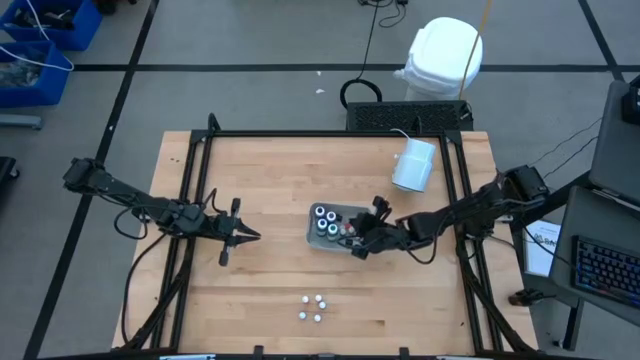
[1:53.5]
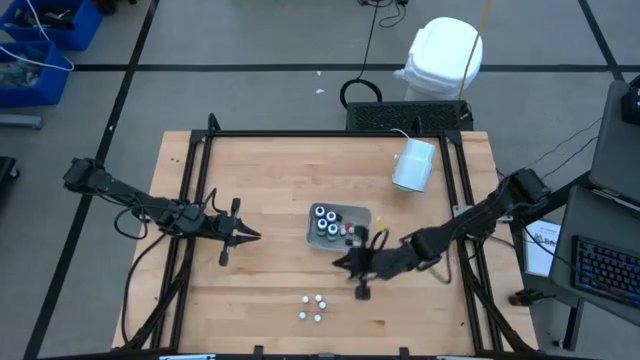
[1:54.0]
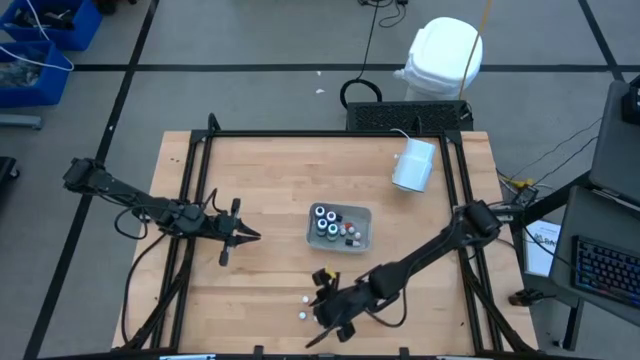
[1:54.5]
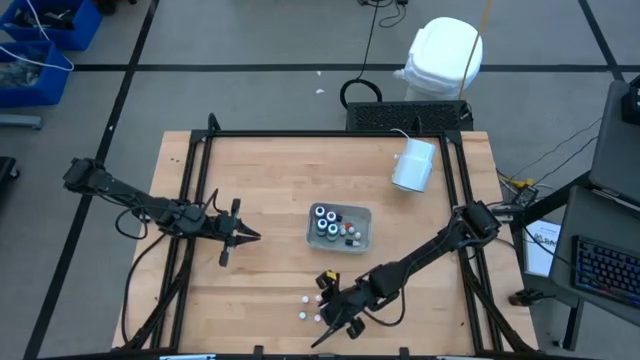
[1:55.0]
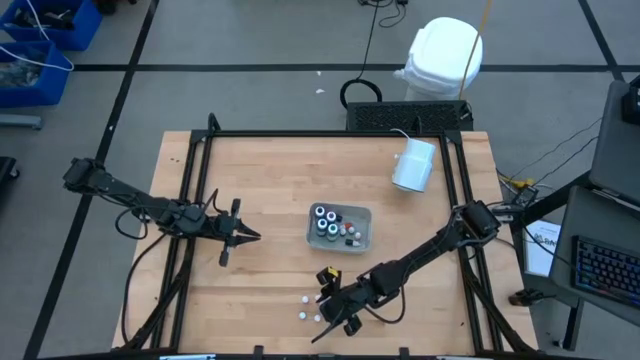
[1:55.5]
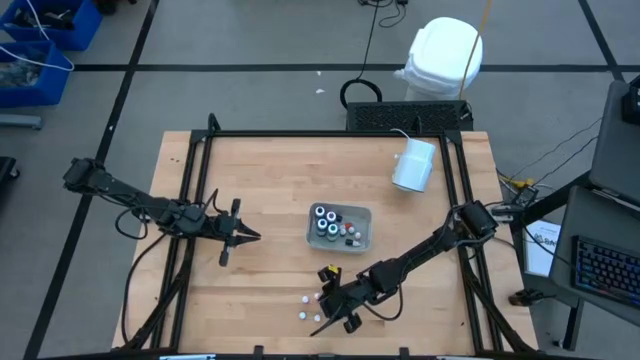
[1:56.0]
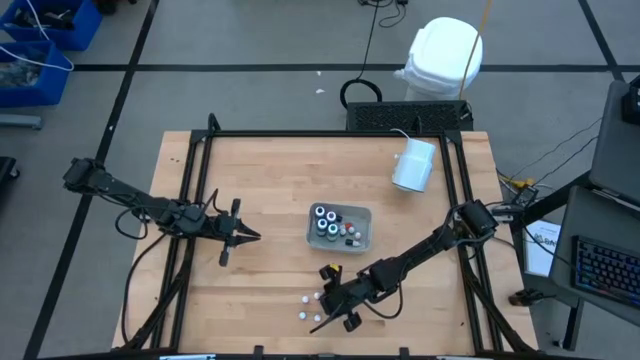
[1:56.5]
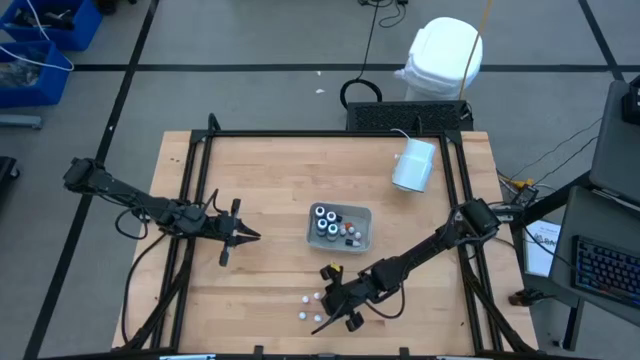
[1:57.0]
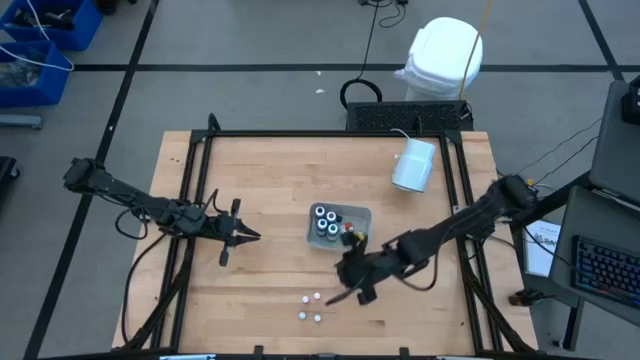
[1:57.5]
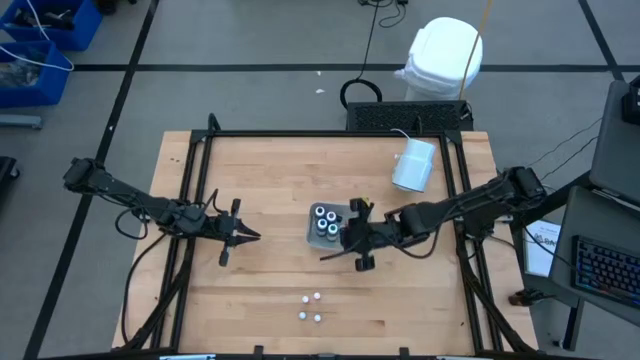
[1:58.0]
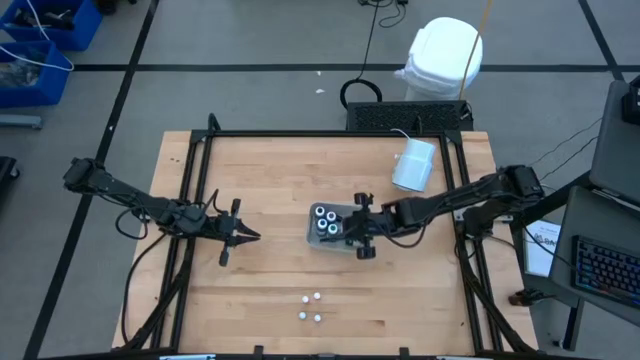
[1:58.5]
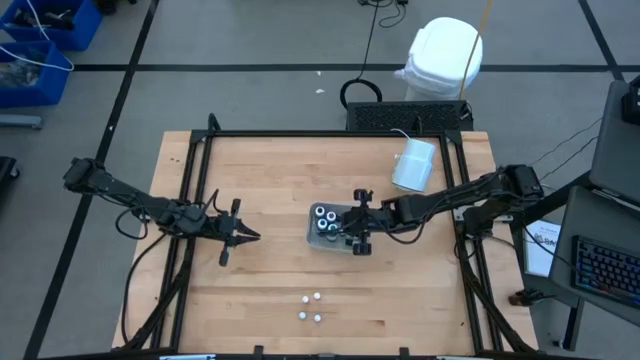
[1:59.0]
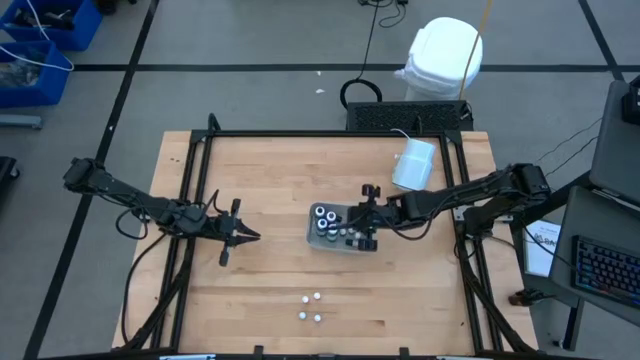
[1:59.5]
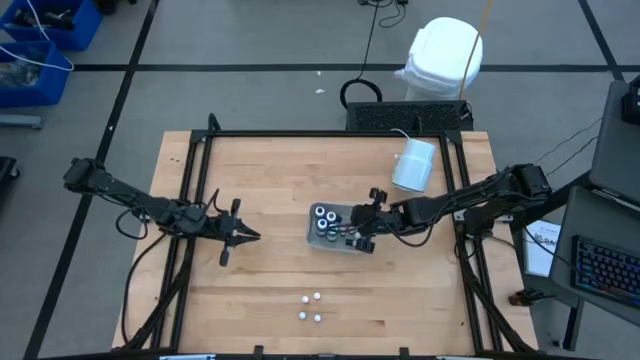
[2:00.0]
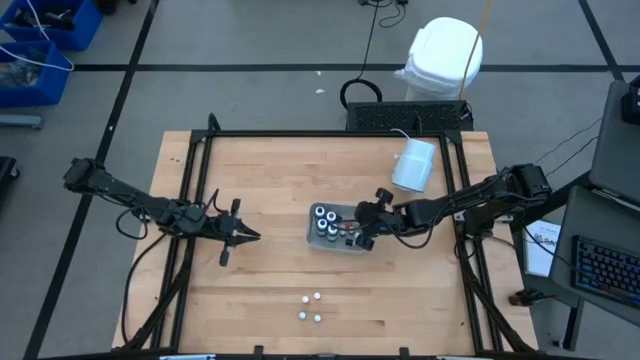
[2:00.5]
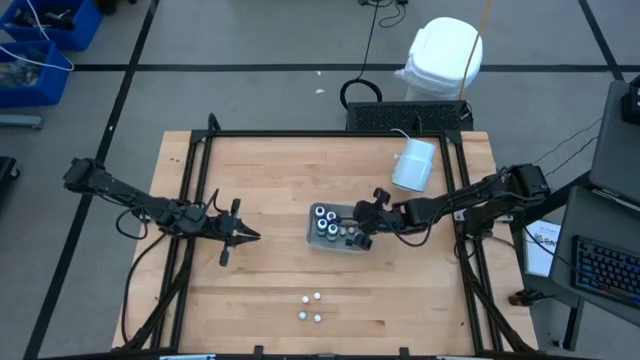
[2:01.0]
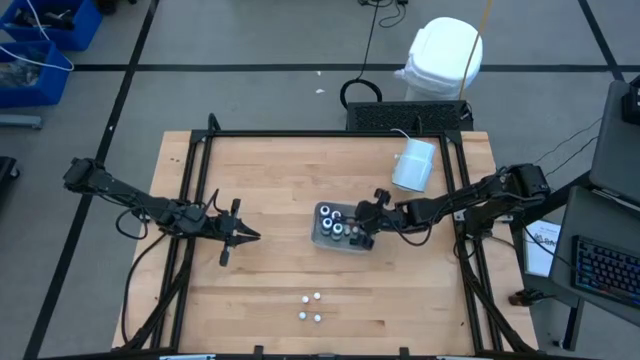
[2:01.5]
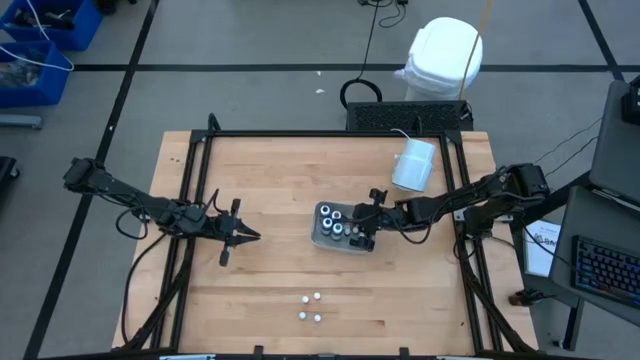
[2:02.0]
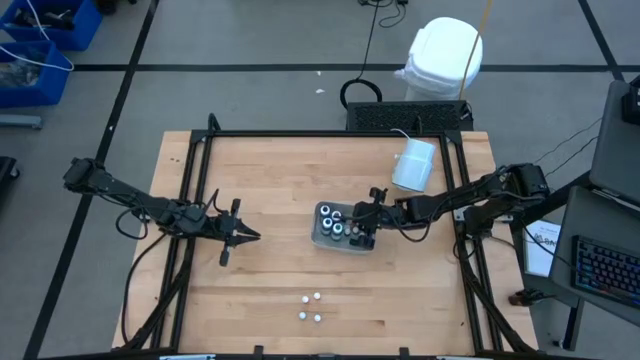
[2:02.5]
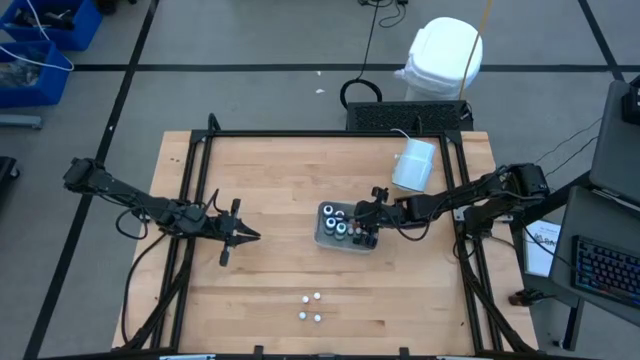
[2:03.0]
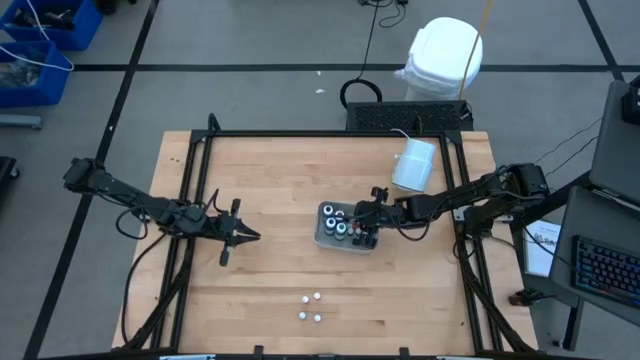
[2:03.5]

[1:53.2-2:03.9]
Task: Pick & Place food coloring
Put the small purple bottle into the gray bin

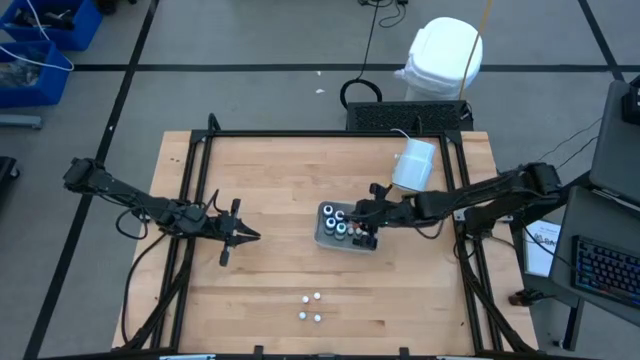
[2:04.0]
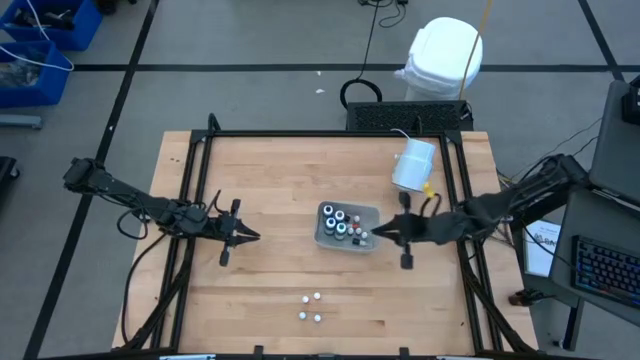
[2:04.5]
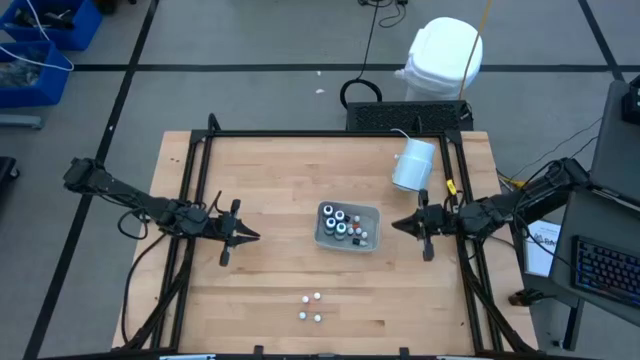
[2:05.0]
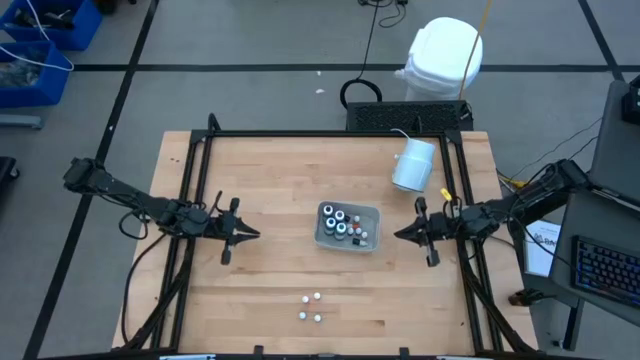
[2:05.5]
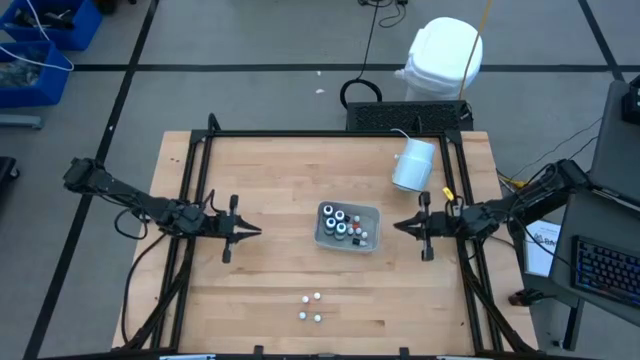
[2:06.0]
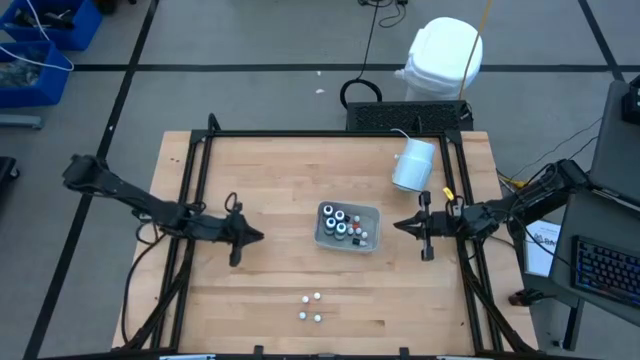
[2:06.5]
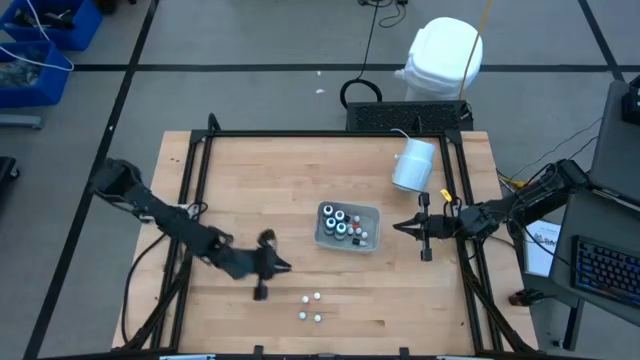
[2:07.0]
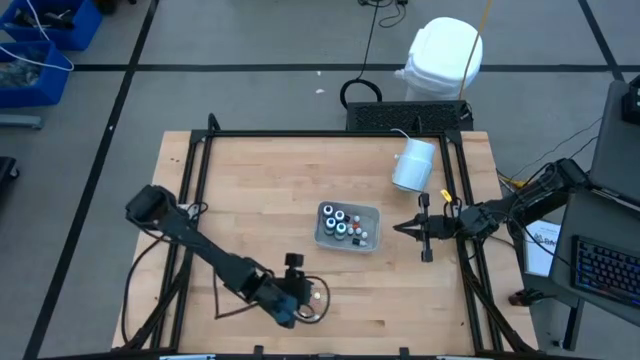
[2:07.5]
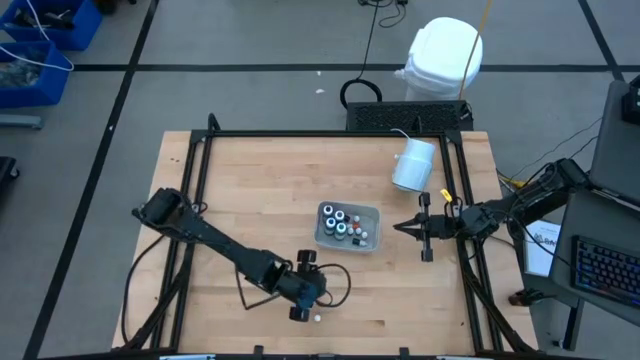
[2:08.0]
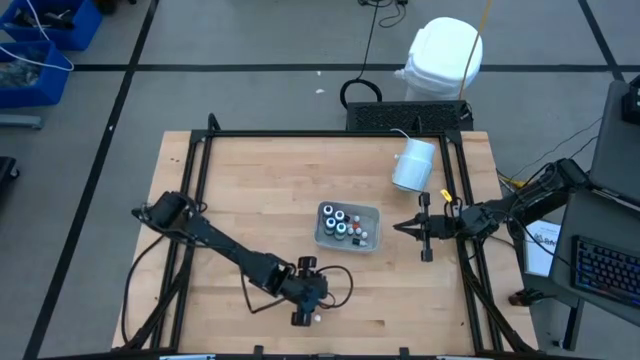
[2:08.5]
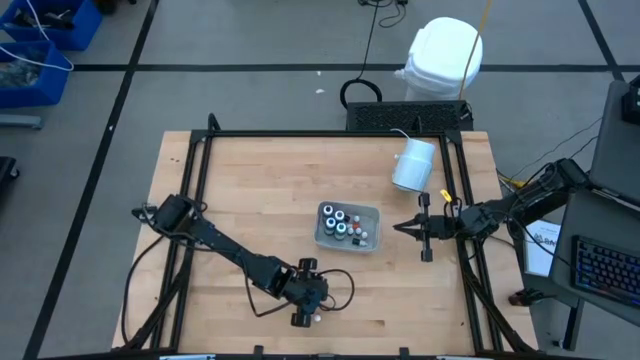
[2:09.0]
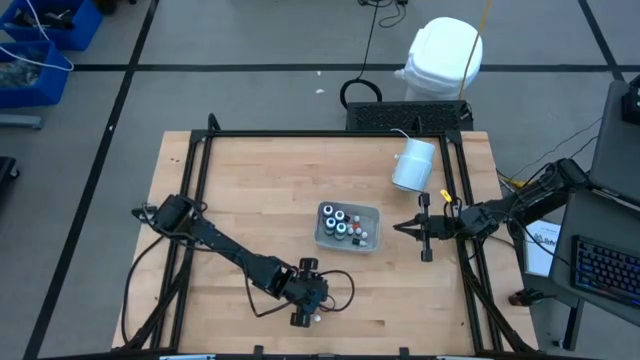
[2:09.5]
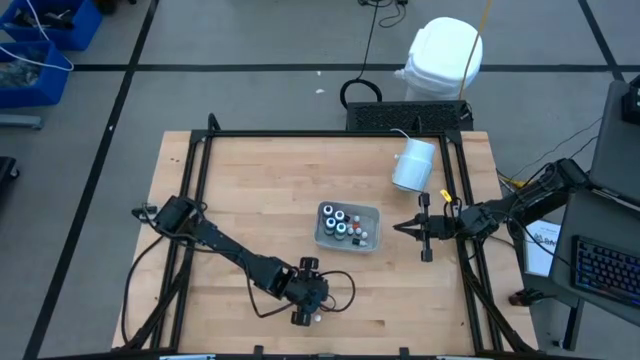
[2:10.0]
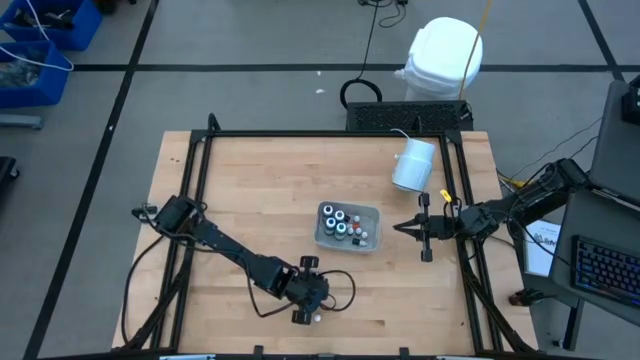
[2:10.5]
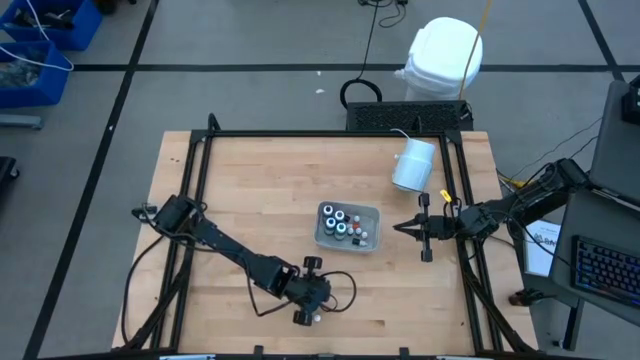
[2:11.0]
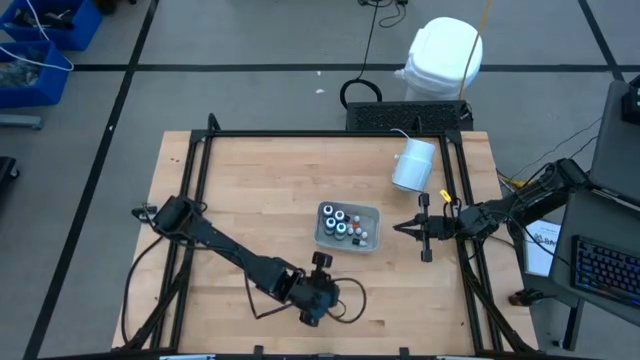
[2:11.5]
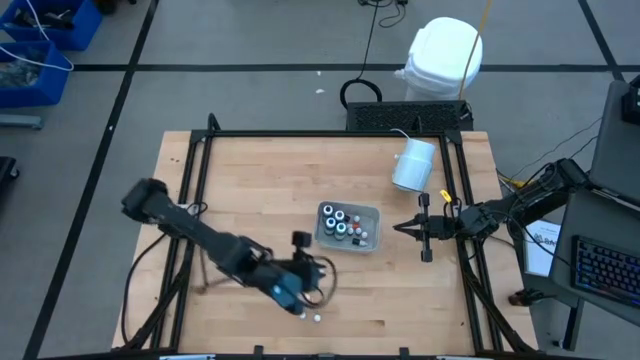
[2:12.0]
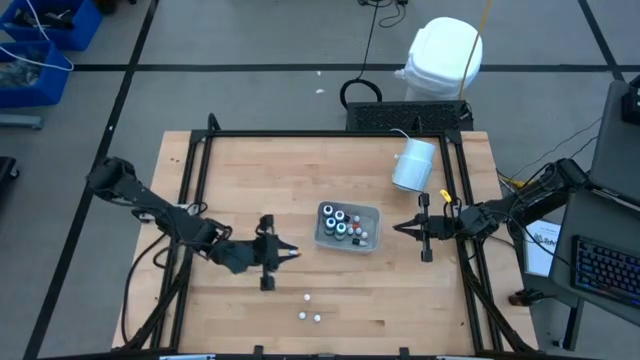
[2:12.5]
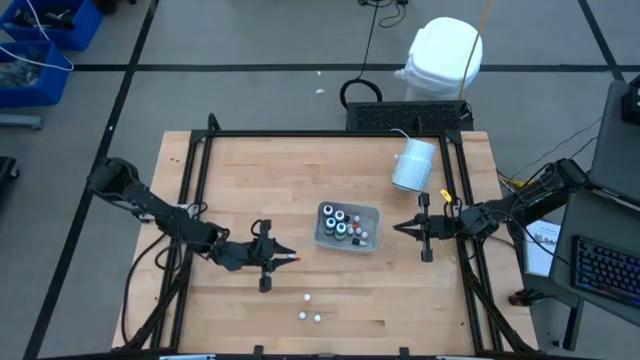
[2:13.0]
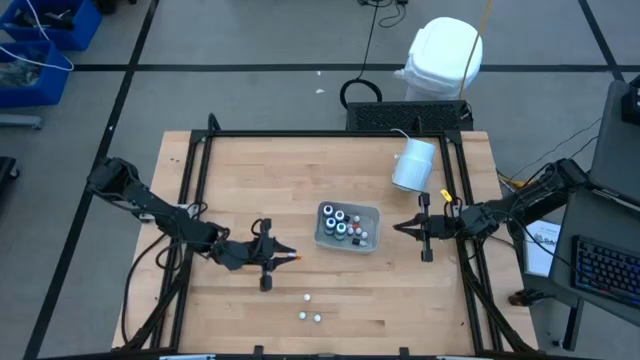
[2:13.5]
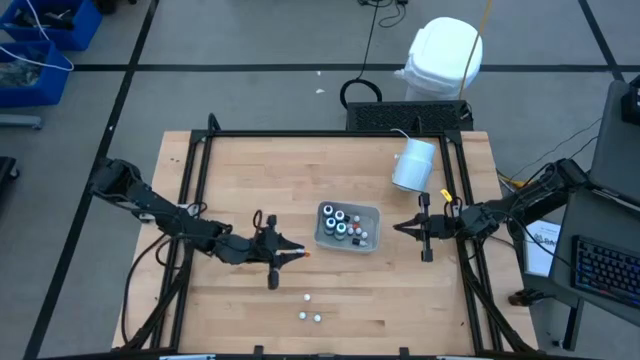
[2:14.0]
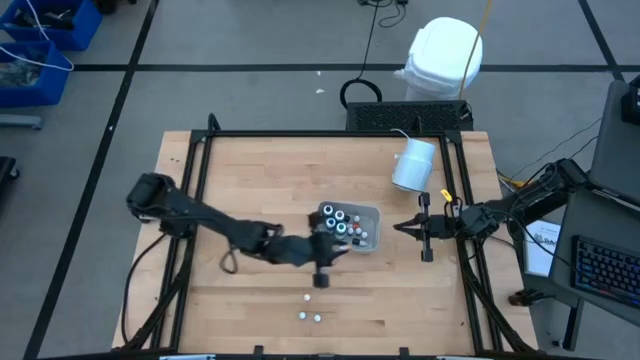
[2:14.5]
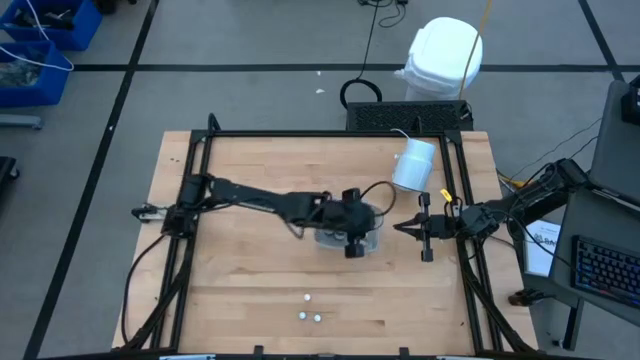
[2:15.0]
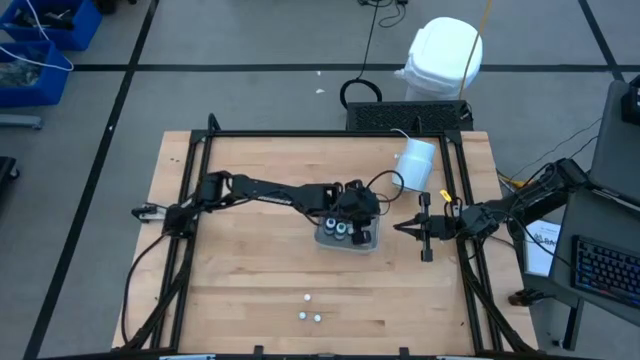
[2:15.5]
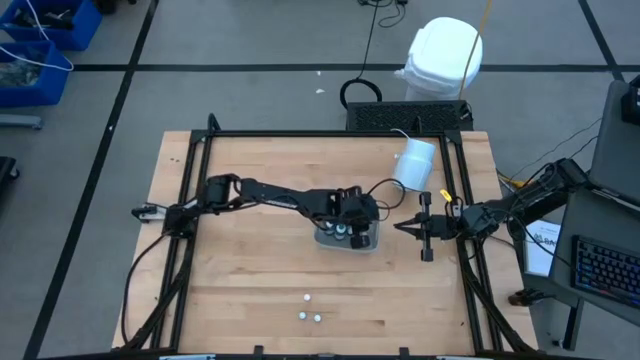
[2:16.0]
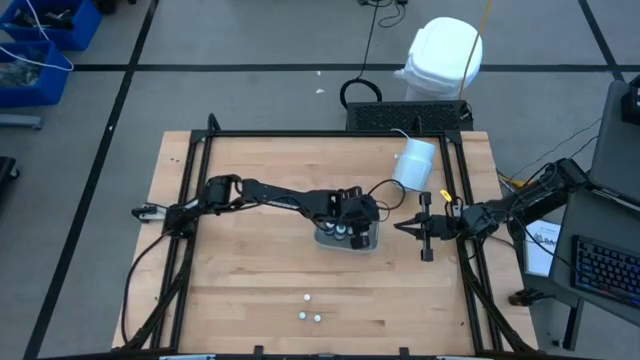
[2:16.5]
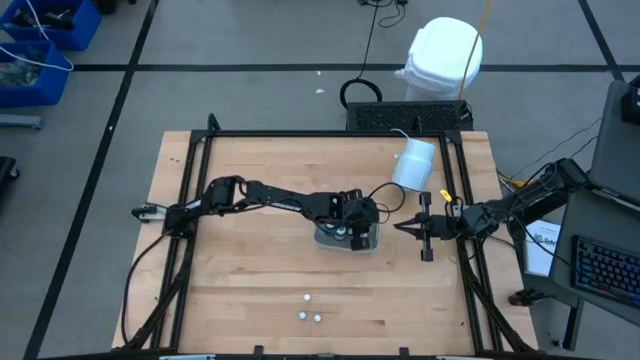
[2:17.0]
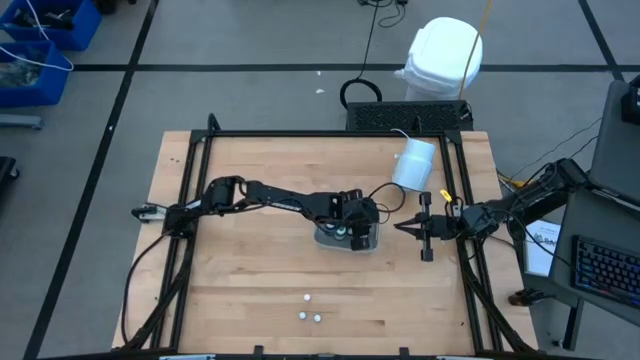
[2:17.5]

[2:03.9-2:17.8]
Put the small yellow bottle into the gray bin
